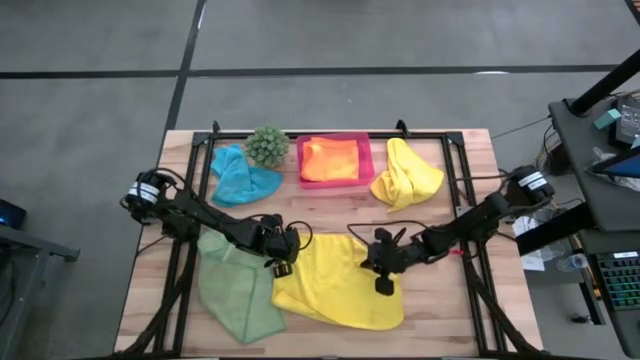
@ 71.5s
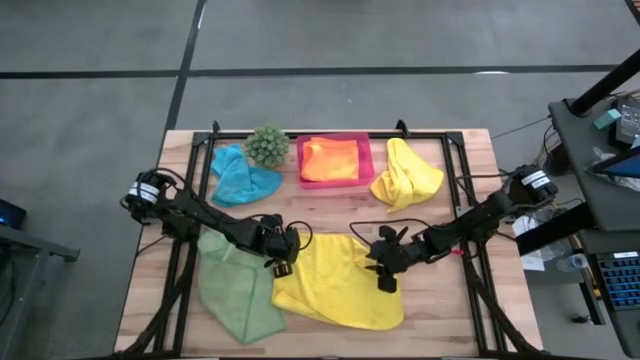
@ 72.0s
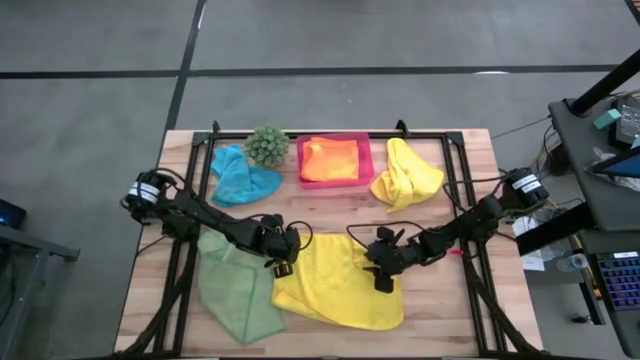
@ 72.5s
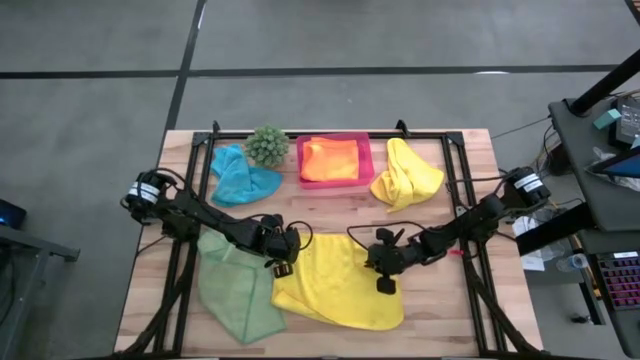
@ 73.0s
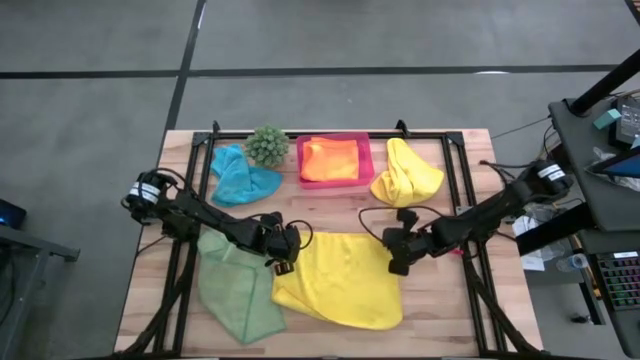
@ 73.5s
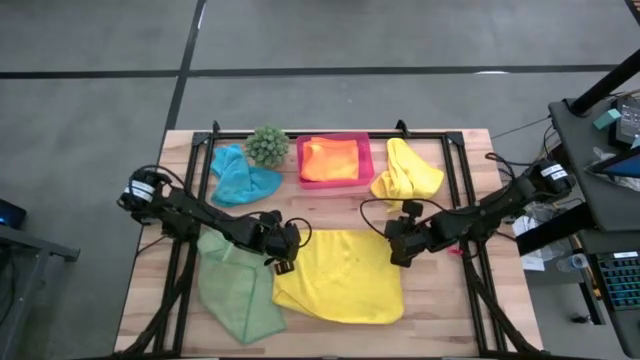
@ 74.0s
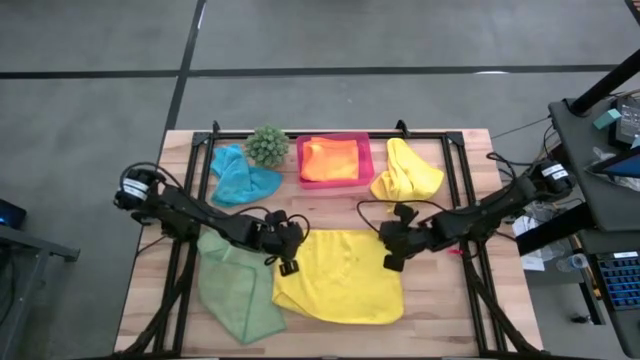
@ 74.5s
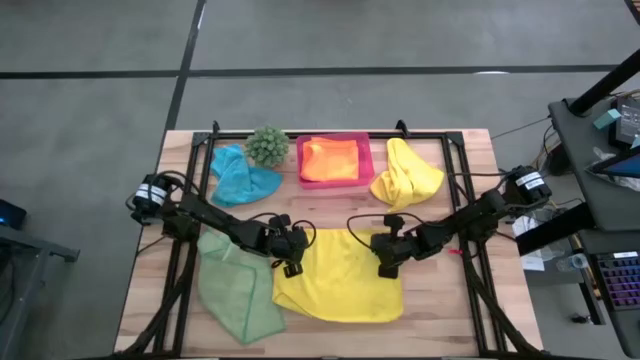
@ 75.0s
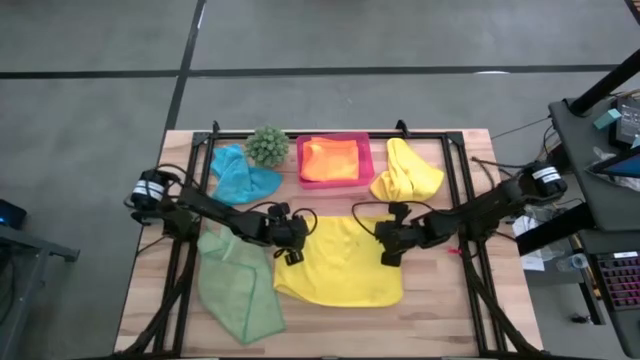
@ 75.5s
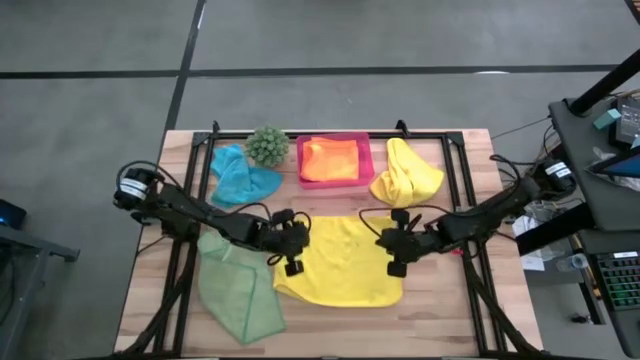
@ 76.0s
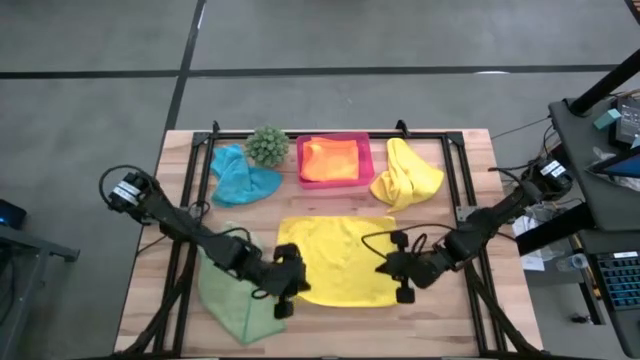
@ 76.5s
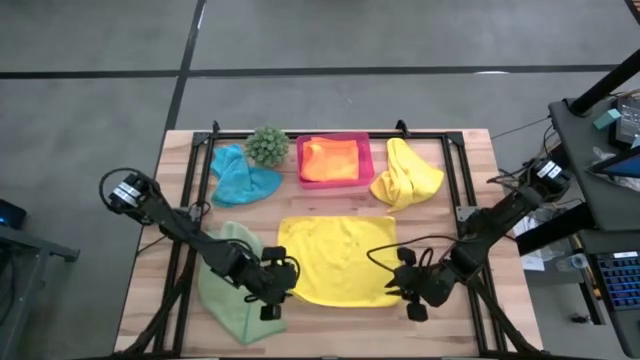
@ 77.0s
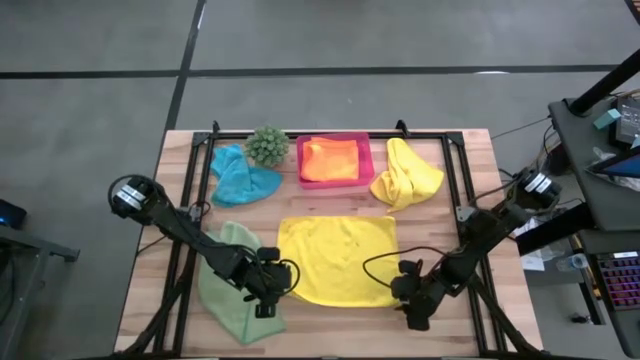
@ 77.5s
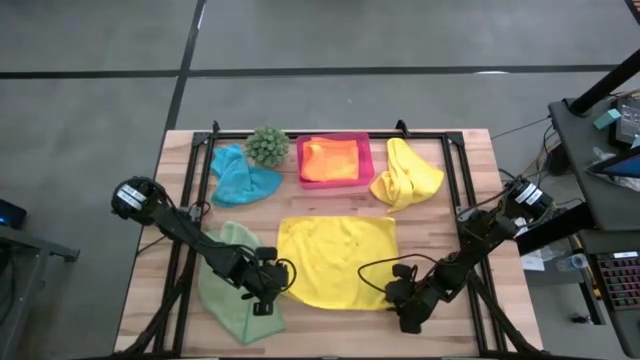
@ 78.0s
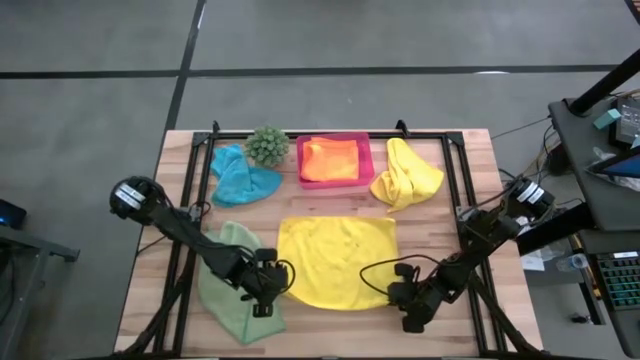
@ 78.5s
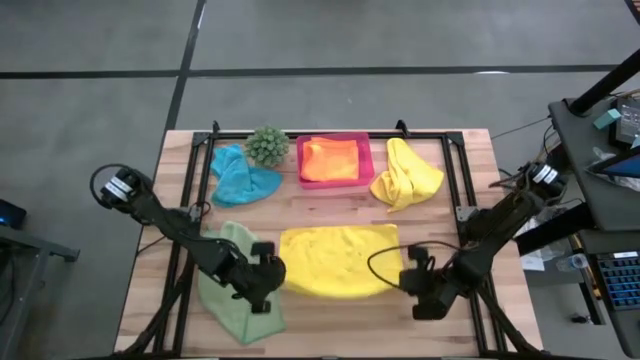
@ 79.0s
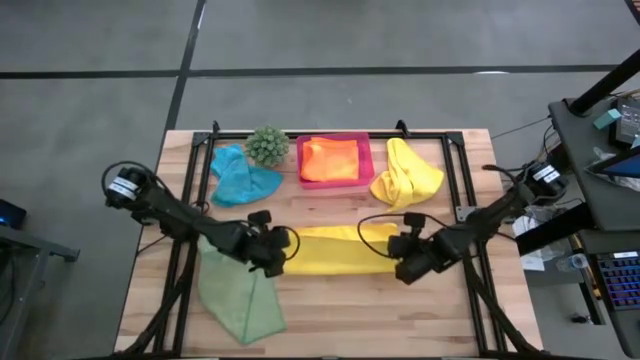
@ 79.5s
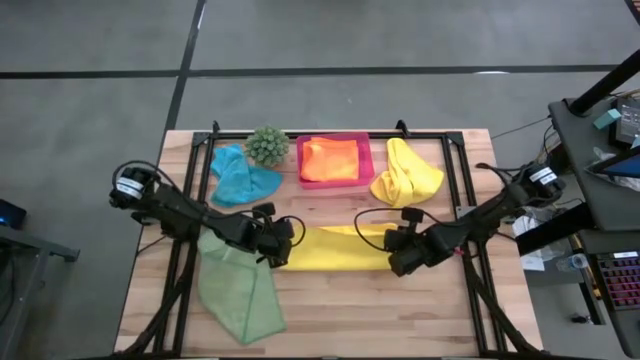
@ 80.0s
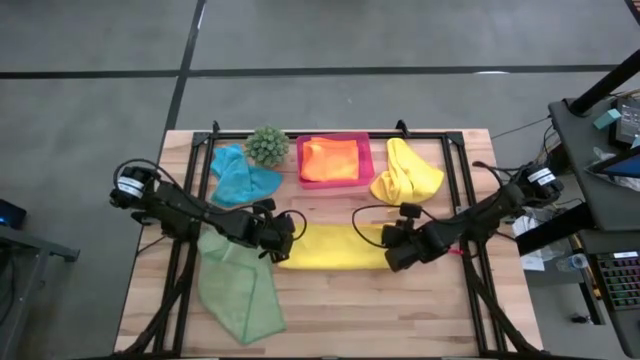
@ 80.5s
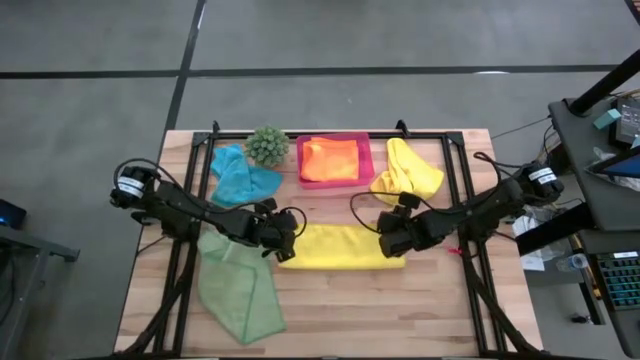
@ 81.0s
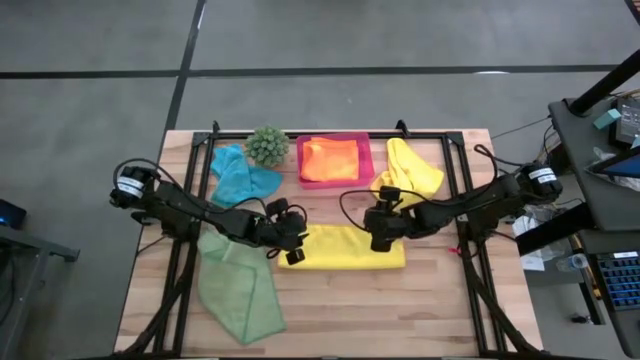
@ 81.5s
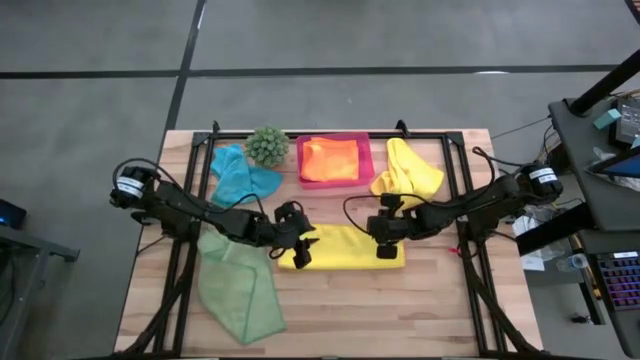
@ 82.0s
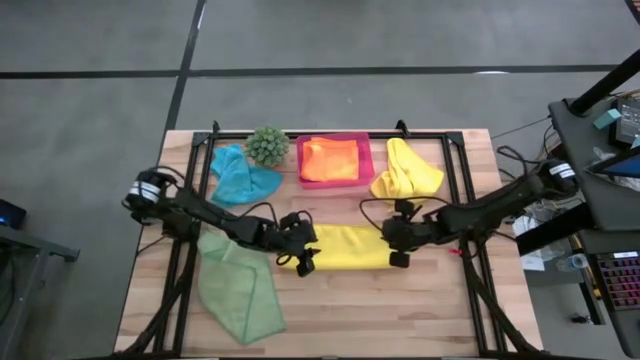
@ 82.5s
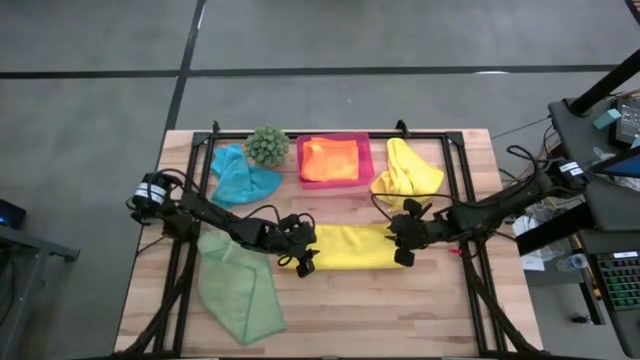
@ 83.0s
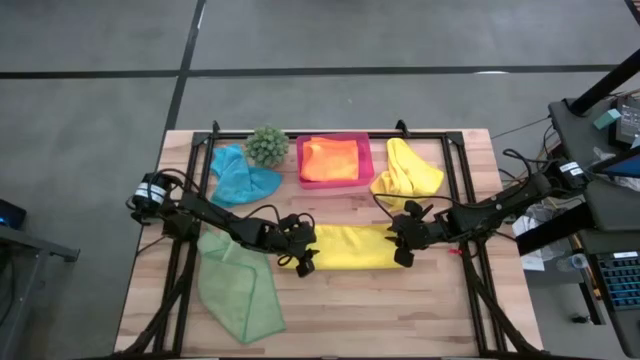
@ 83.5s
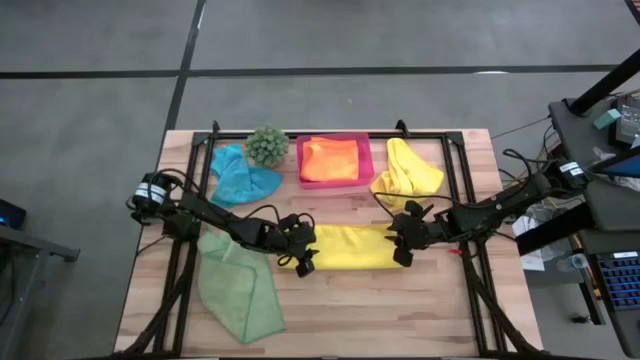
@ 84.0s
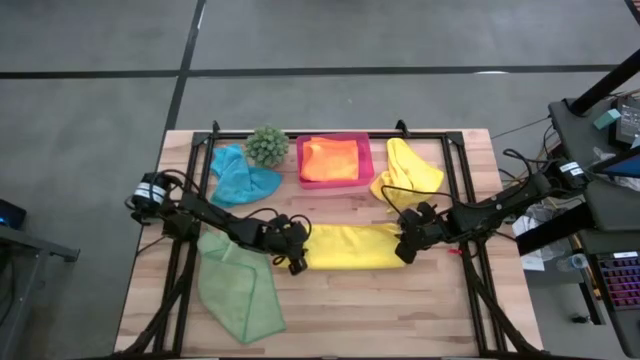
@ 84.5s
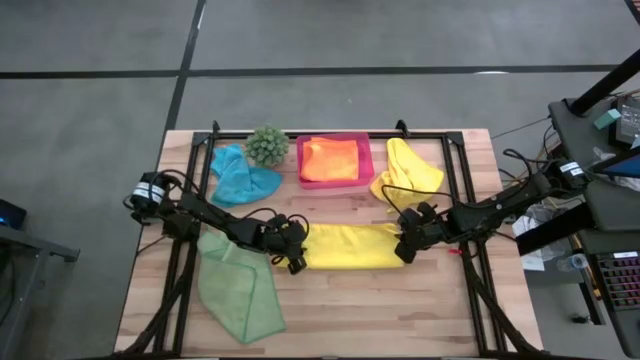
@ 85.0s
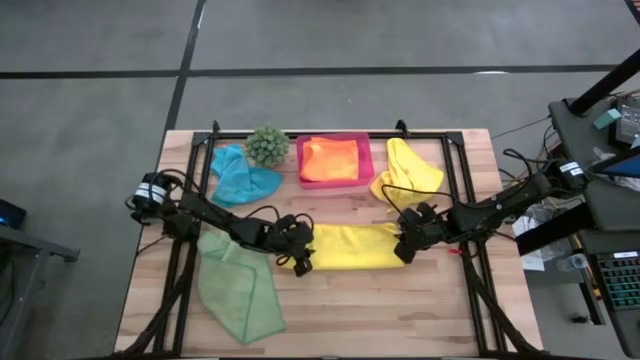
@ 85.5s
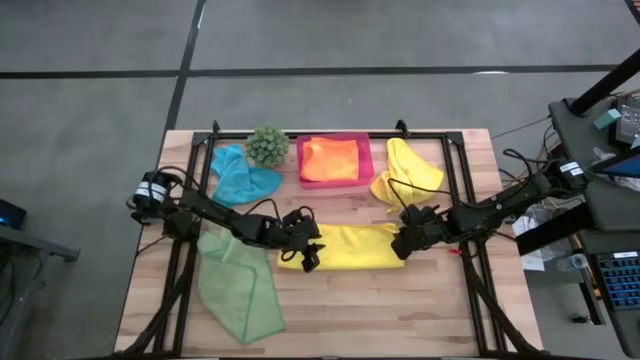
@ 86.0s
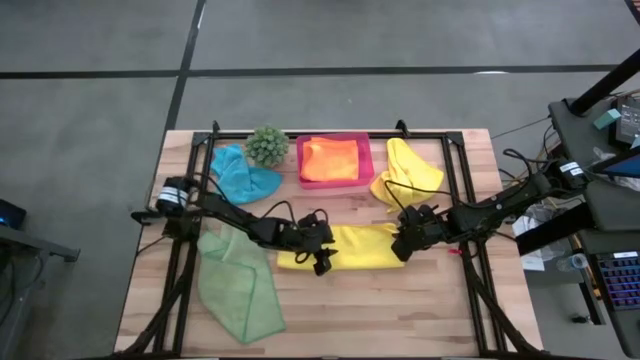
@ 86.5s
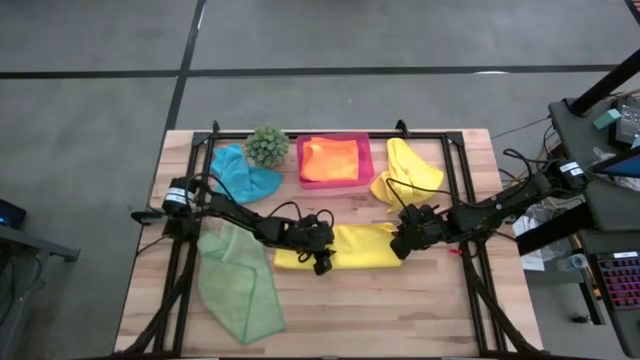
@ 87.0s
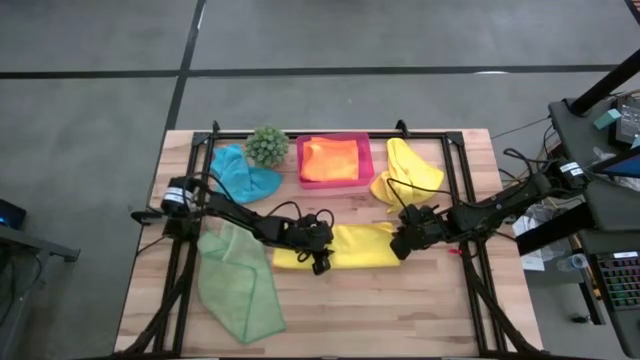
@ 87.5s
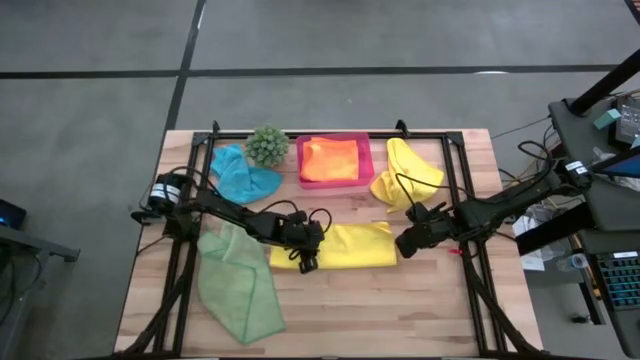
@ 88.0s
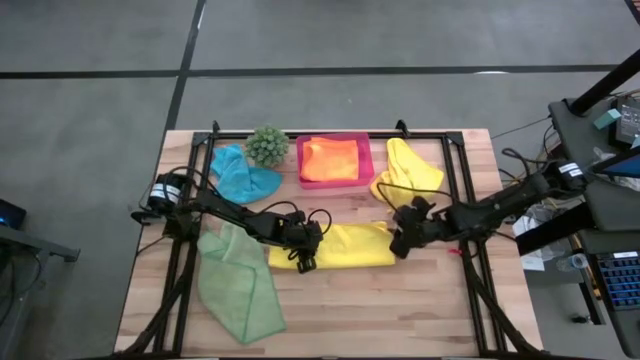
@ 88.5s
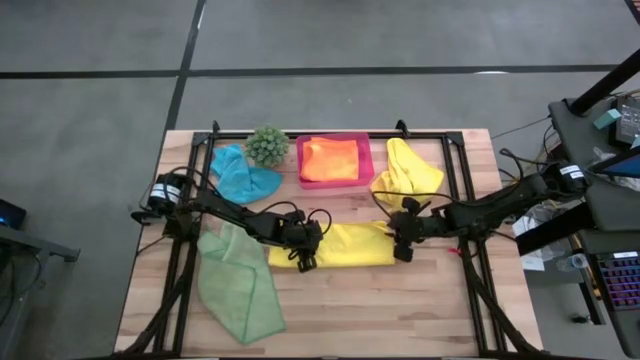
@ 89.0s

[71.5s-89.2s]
Task: Fold microfiber towels
Fold the bottom yellow microfiber towel
